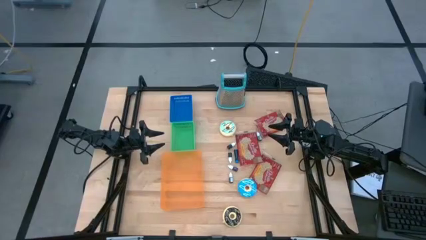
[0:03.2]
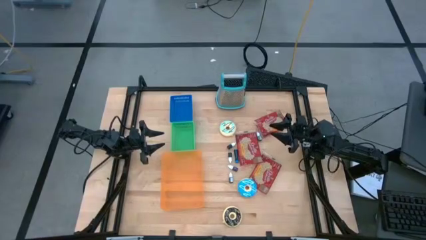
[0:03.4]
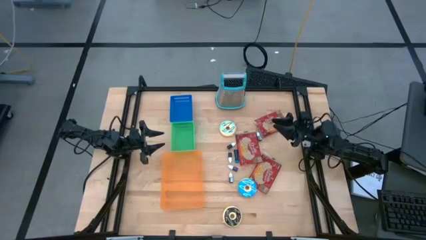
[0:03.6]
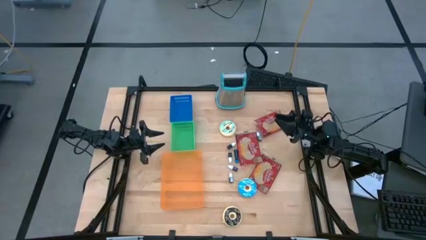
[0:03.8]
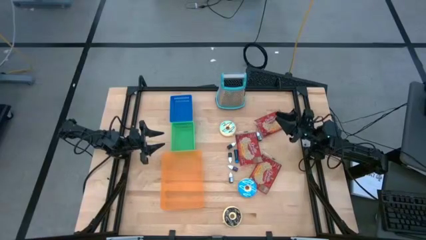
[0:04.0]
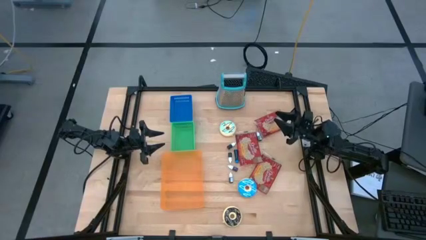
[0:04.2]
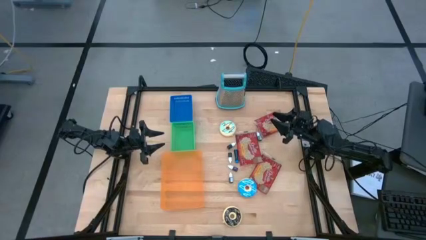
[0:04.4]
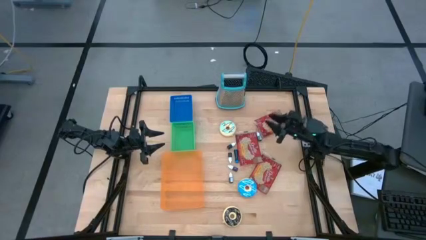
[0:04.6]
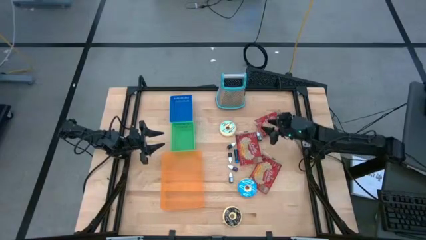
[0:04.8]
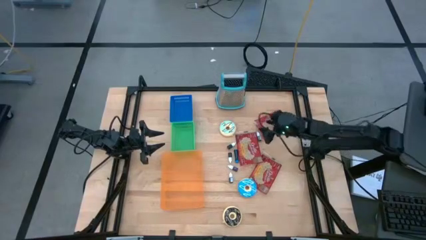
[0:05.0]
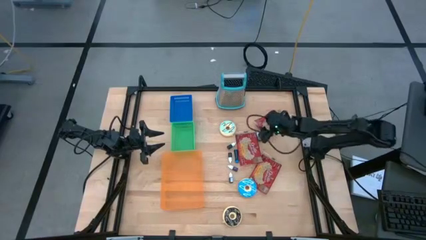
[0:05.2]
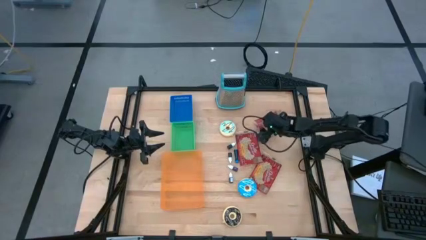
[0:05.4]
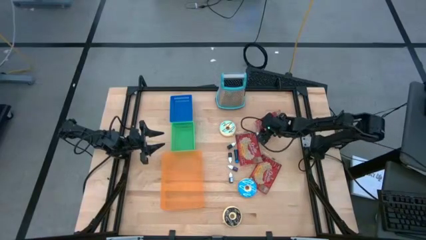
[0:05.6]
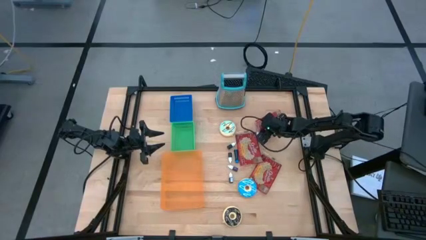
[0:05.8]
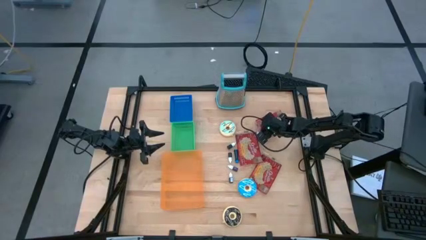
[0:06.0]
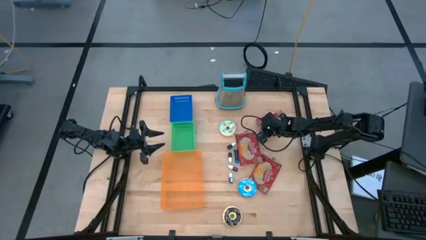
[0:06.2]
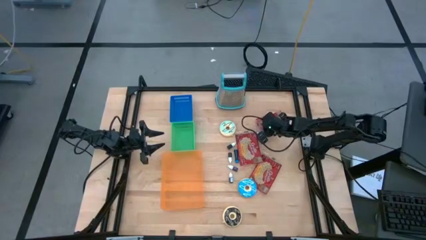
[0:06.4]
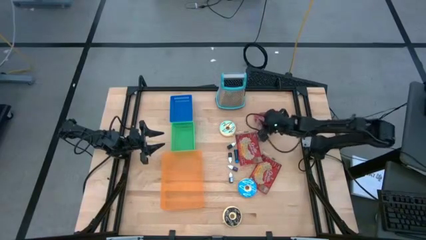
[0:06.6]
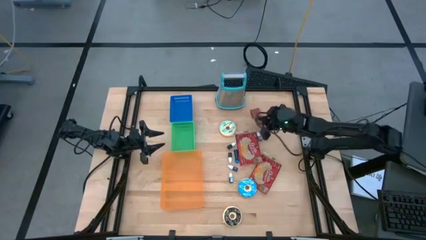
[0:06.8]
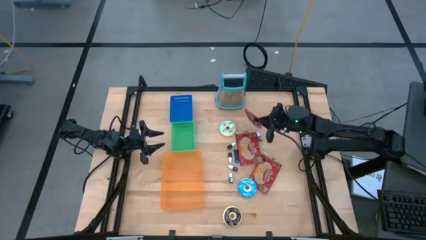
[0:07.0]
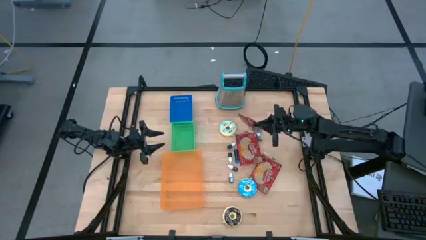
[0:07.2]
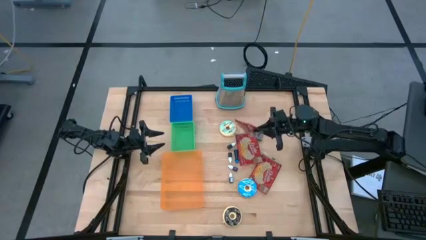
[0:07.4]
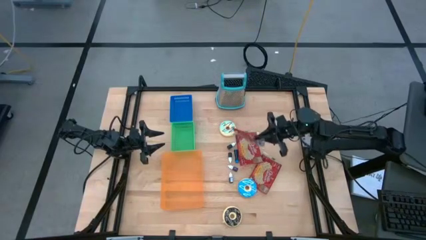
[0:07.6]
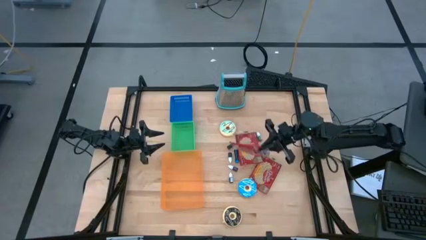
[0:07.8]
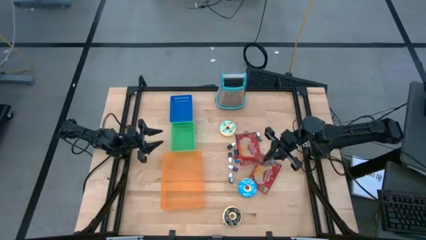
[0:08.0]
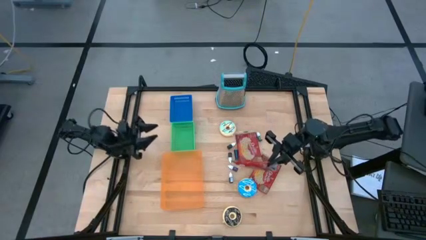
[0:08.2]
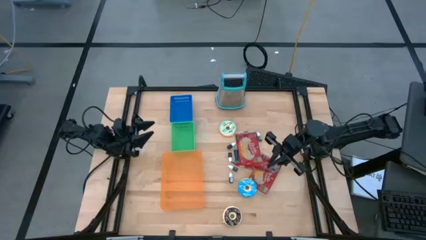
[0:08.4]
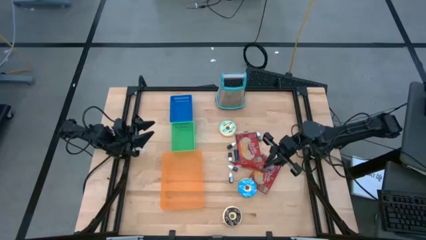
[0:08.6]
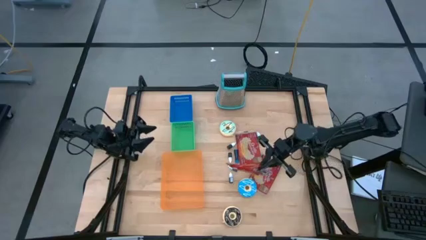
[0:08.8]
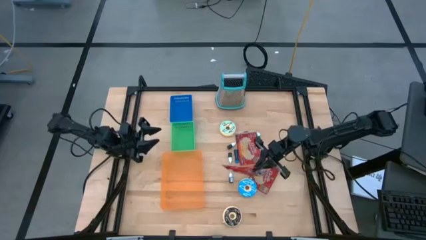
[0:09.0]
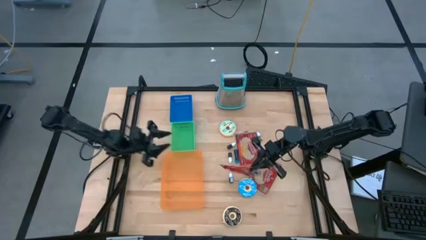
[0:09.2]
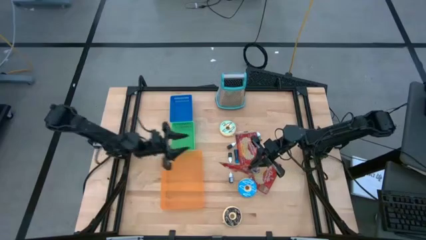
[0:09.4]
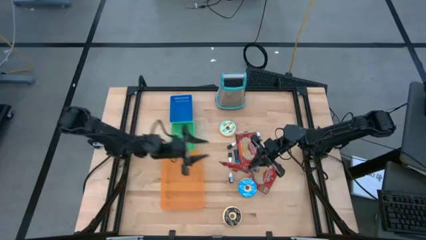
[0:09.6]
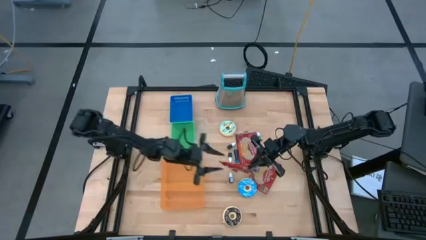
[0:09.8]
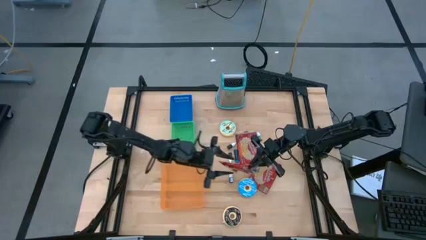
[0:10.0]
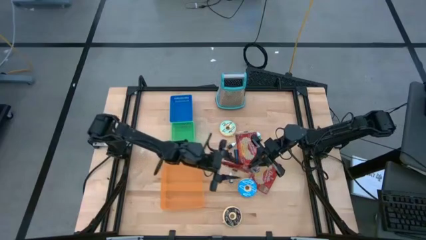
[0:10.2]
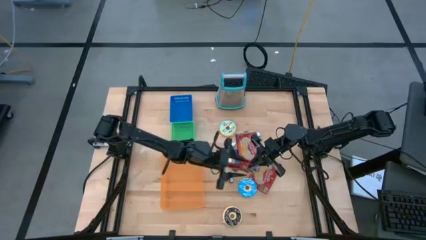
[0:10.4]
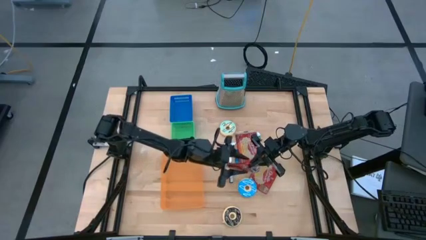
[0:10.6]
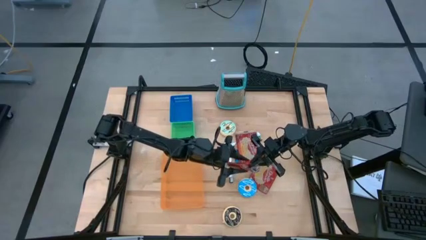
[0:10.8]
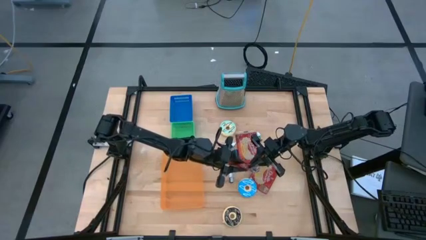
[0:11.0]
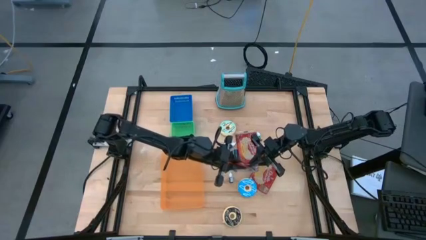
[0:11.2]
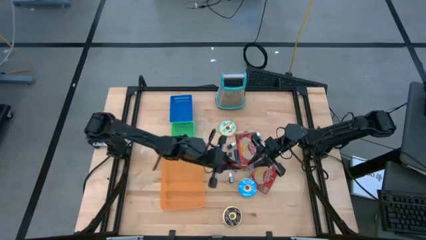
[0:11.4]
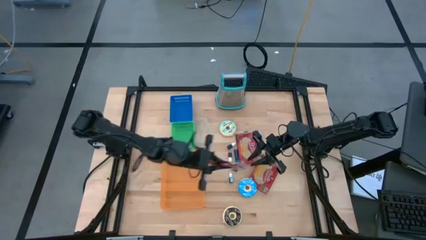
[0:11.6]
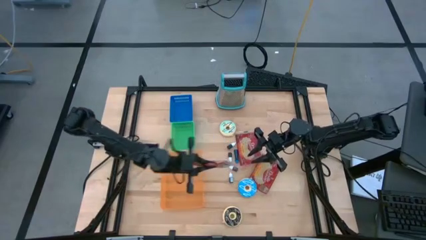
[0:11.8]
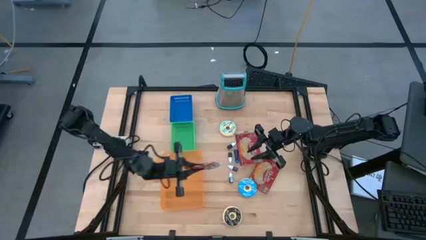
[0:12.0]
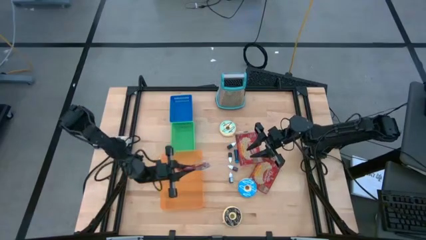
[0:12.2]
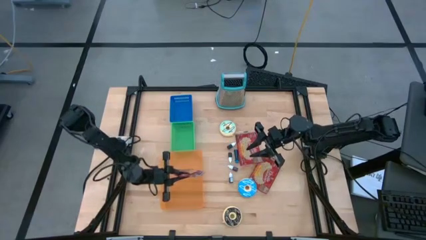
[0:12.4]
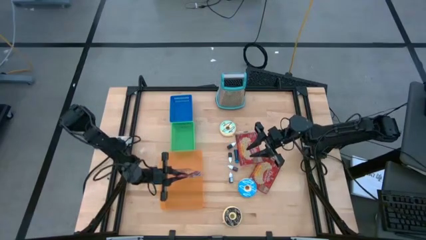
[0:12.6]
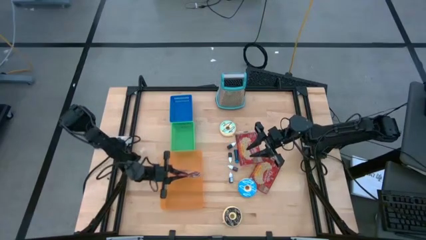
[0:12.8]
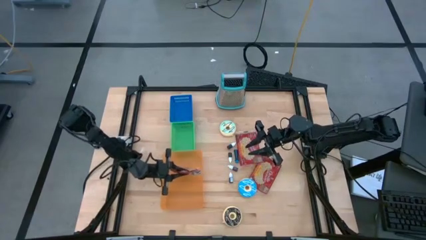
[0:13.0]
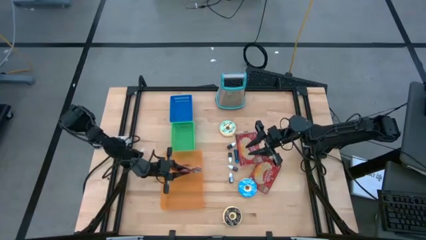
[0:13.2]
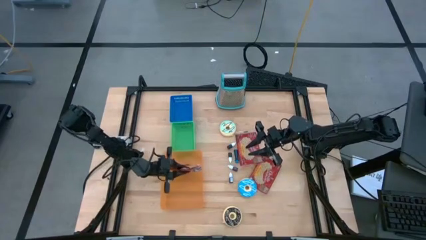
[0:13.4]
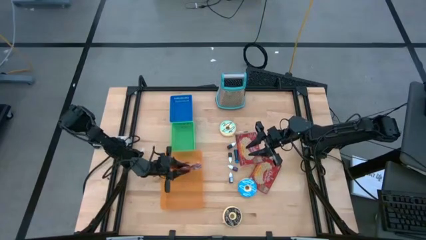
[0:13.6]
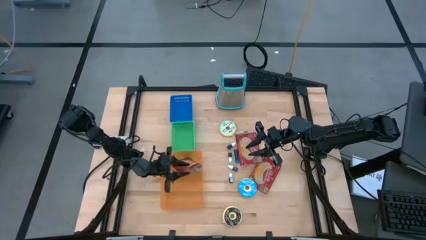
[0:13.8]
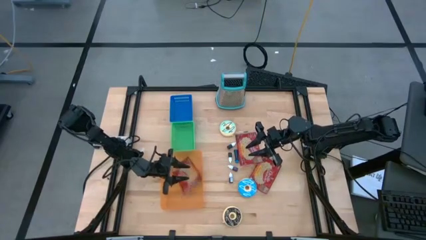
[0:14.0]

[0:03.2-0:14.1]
Put the top right red popcorn bag into the orange bin
